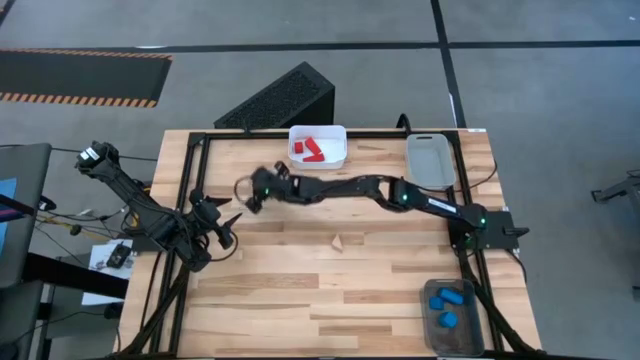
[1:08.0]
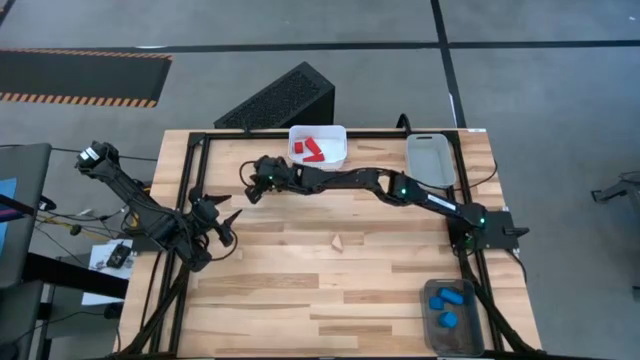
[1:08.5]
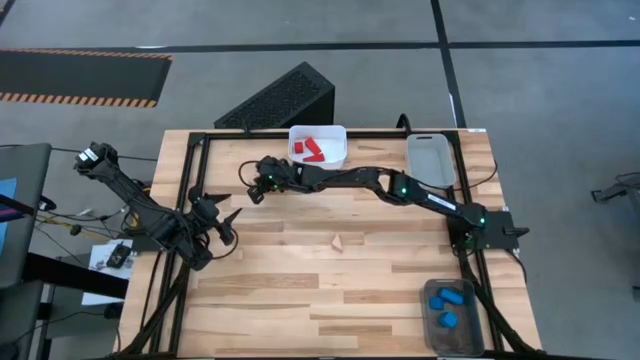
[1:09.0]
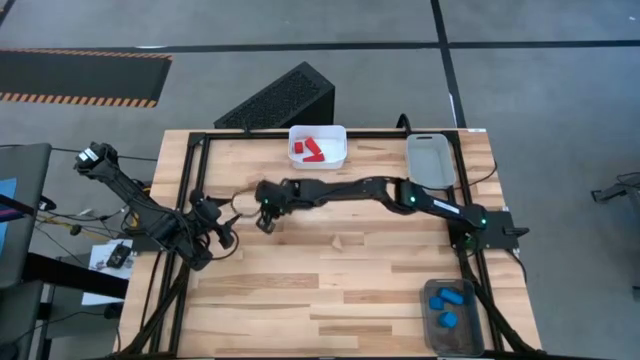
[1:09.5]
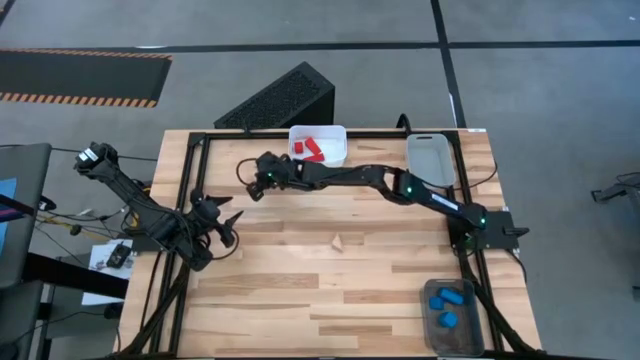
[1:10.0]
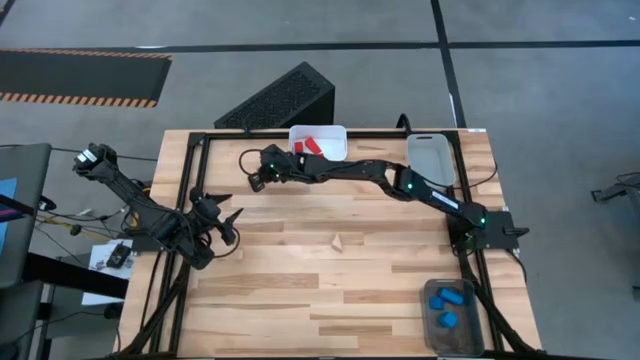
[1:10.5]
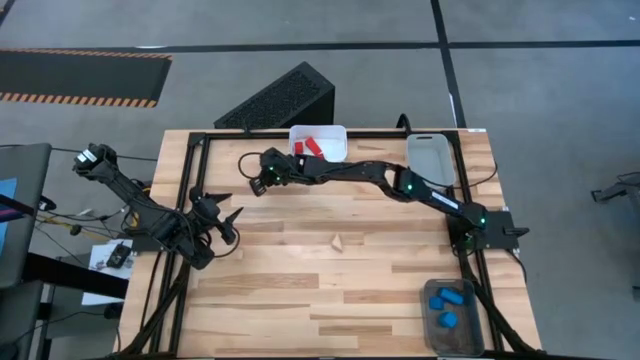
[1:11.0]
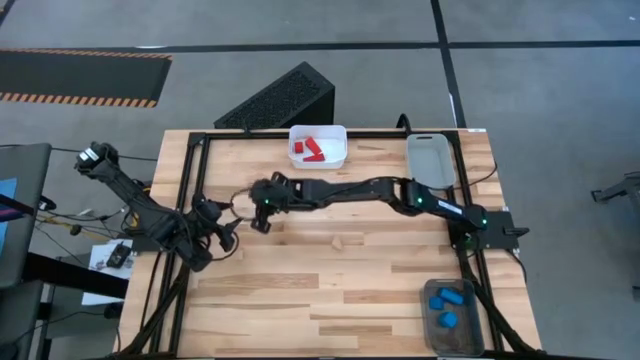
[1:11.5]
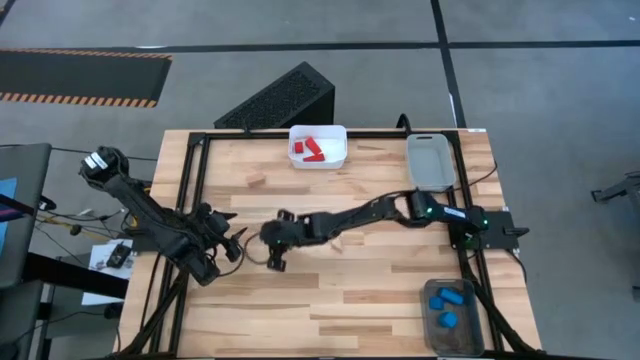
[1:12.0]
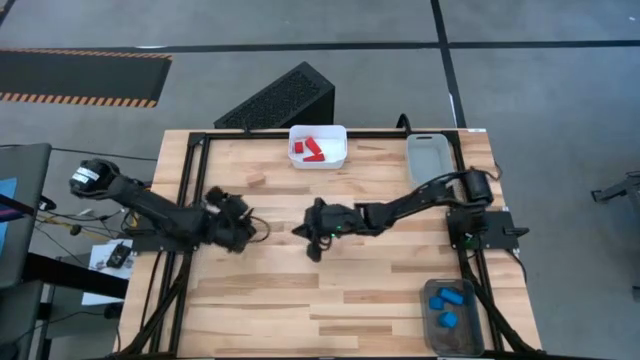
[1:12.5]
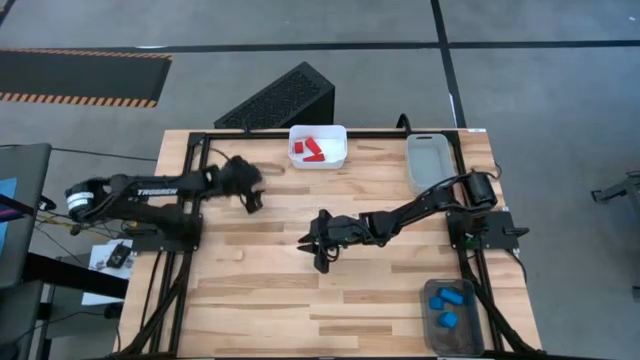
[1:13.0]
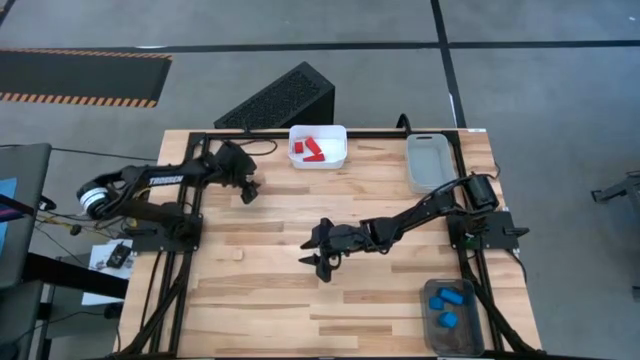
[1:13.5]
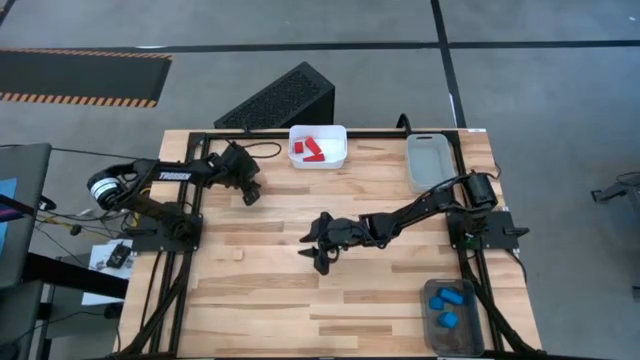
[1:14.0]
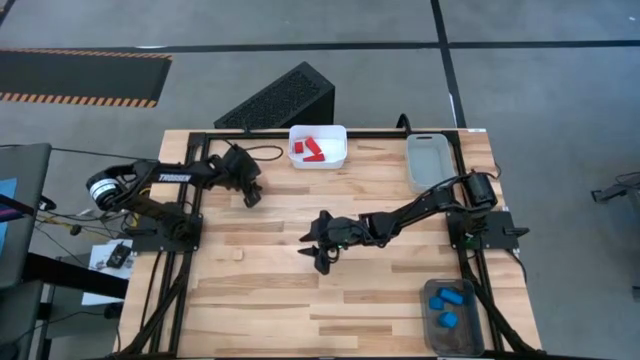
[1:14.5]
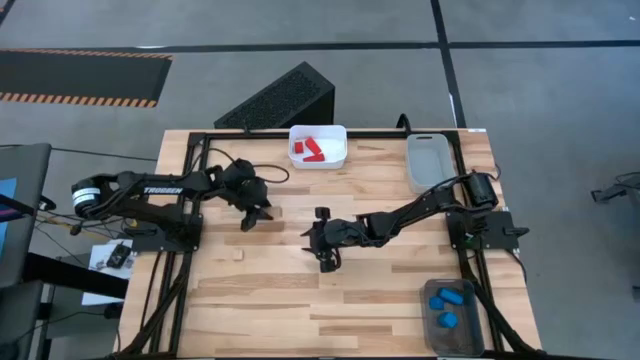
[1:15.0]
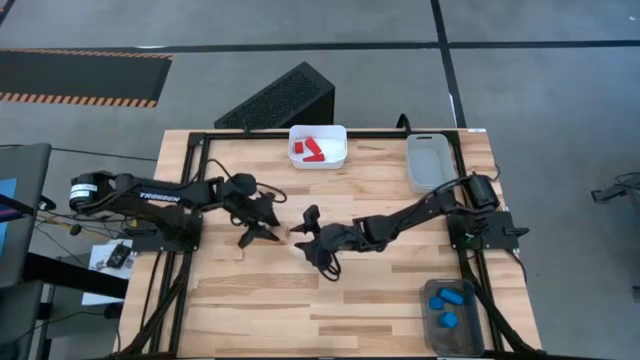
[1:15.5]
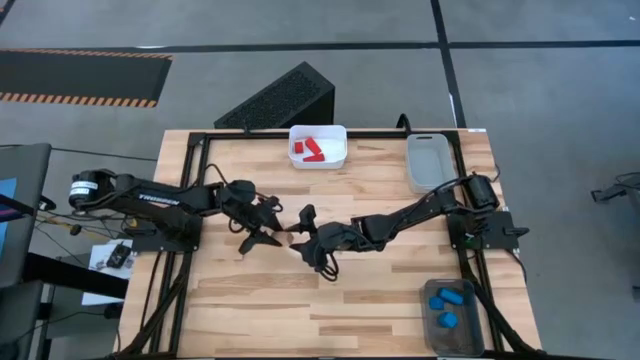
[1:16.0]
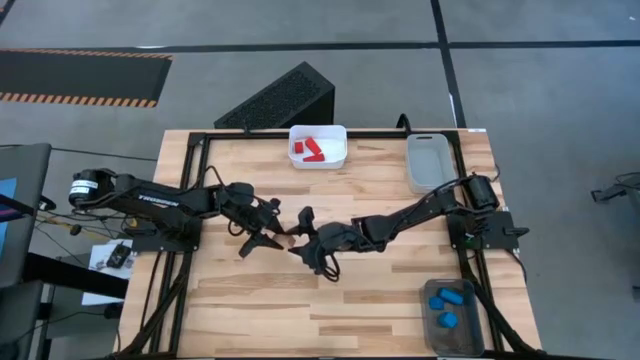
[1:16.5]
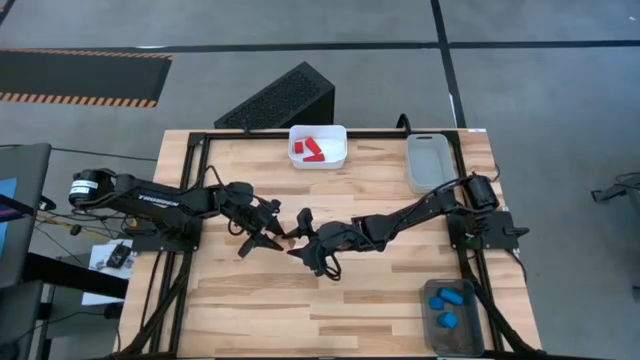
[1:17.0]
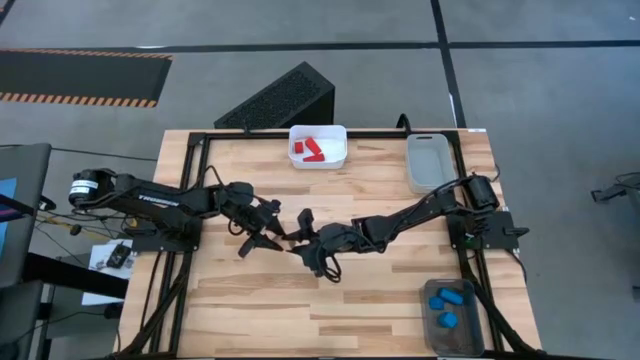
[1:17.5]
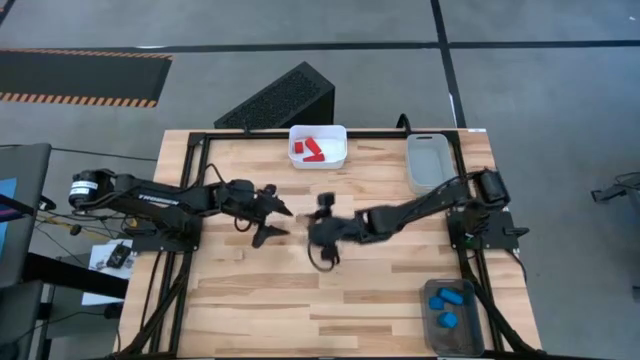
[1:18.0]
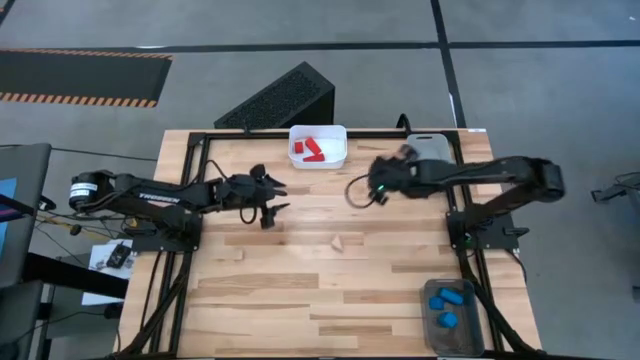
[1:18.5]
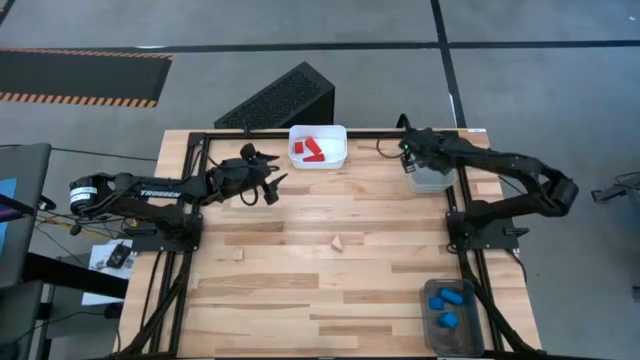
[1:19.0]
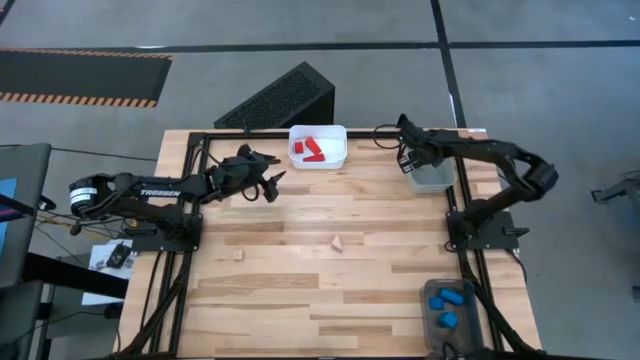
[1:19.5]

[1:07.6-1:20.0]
Task: Sort & place blocks by color
Put the top left brown block into the gray bin

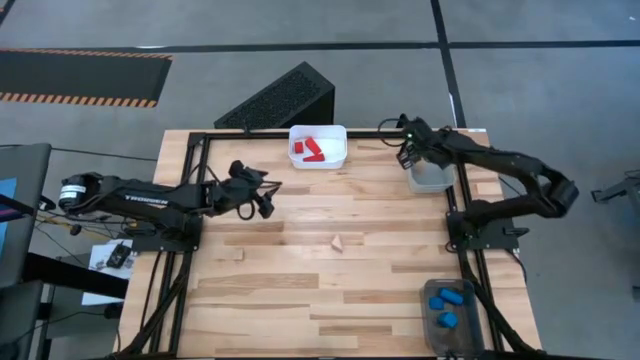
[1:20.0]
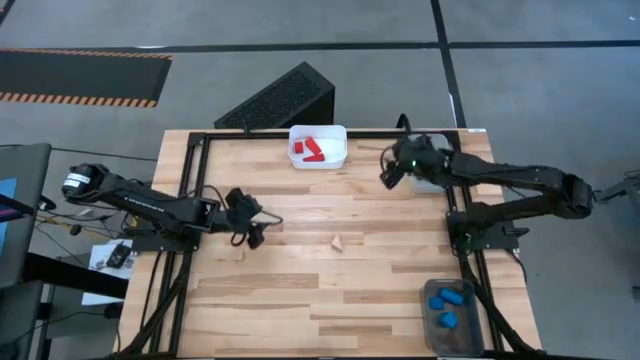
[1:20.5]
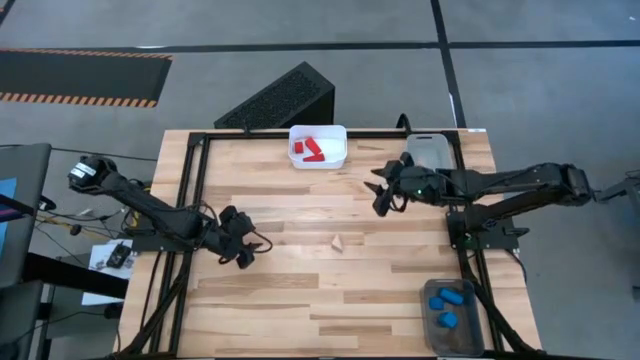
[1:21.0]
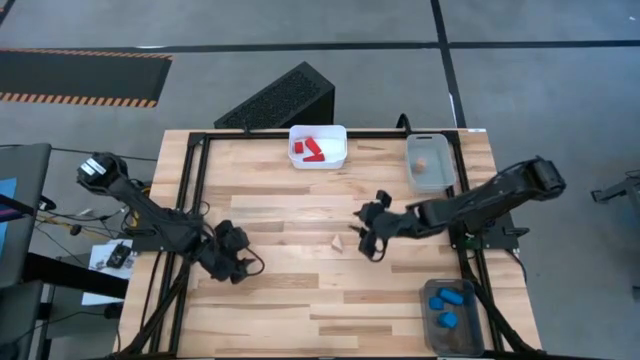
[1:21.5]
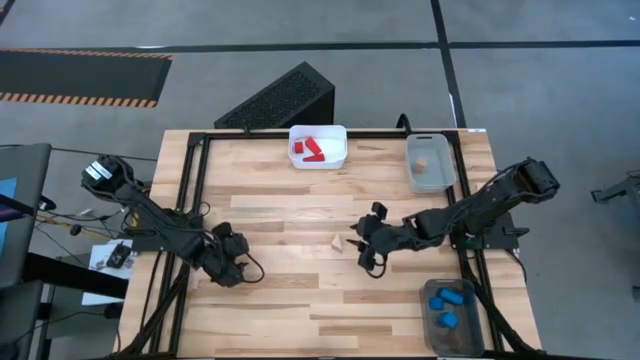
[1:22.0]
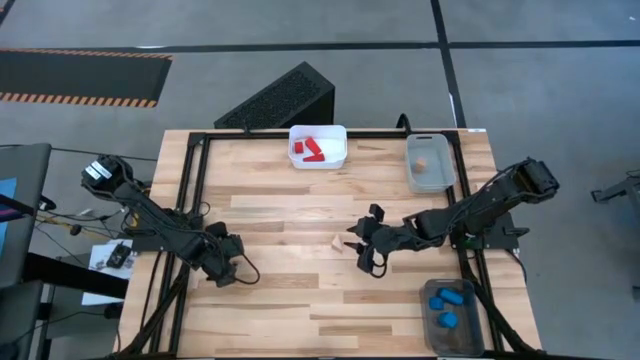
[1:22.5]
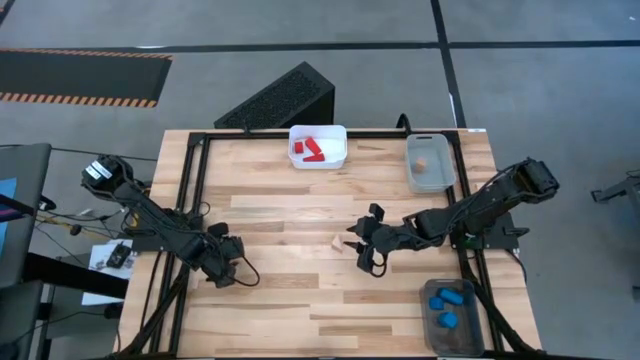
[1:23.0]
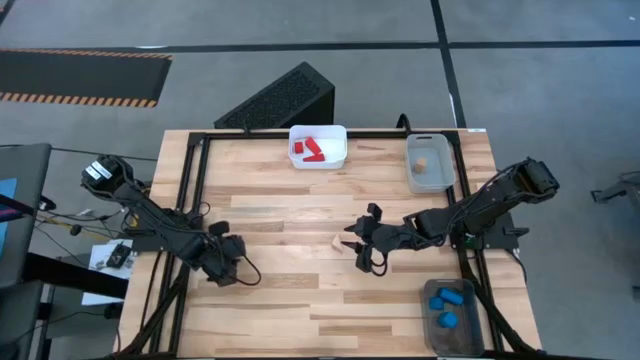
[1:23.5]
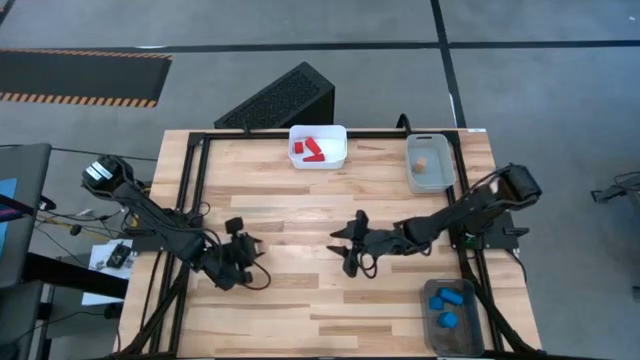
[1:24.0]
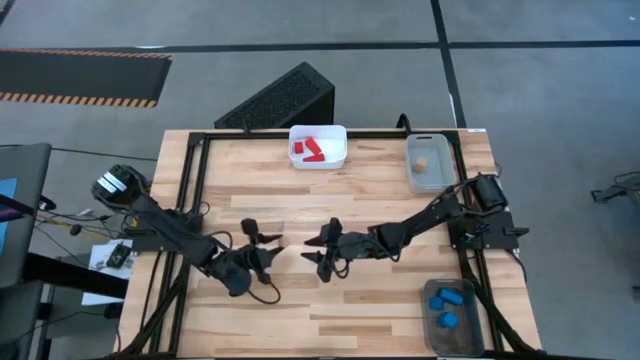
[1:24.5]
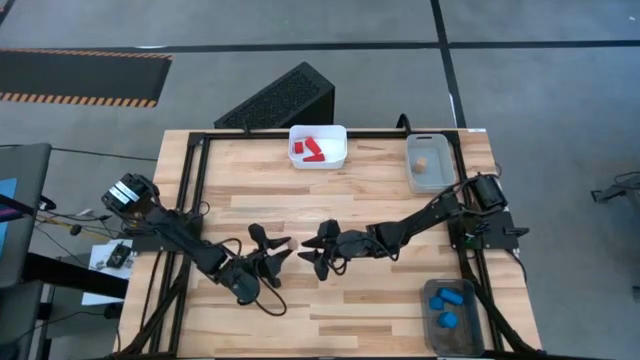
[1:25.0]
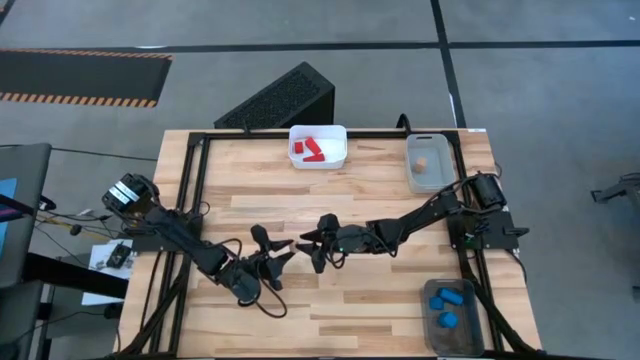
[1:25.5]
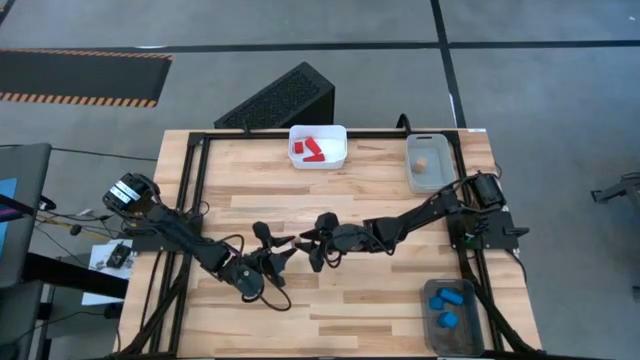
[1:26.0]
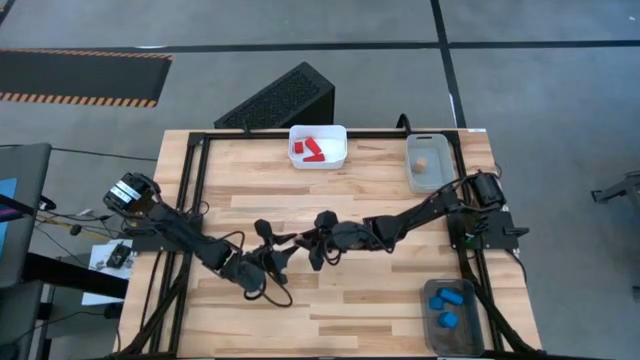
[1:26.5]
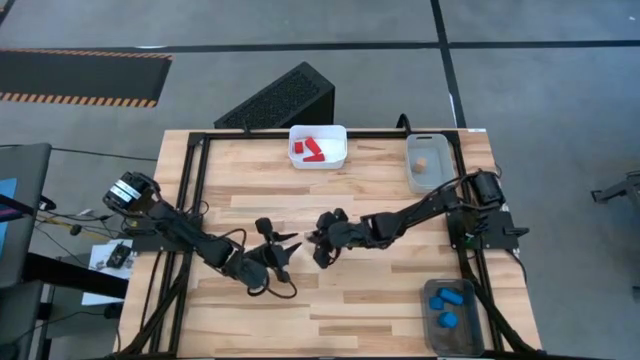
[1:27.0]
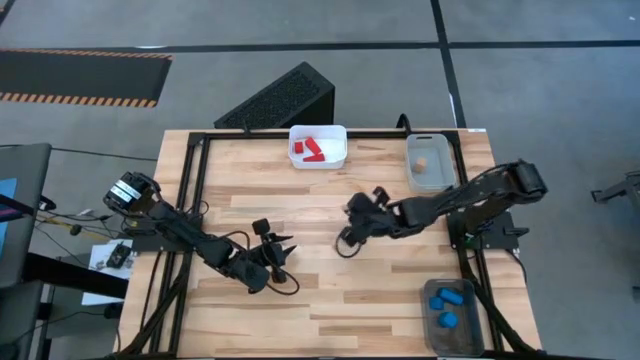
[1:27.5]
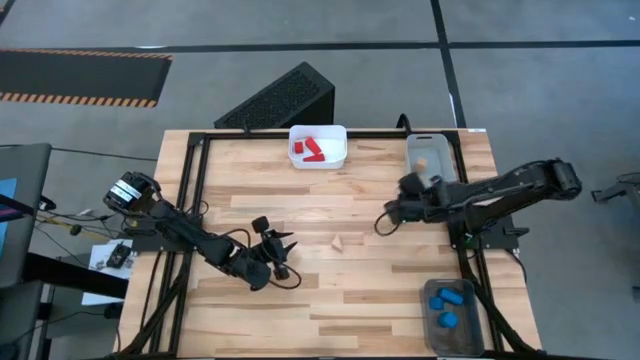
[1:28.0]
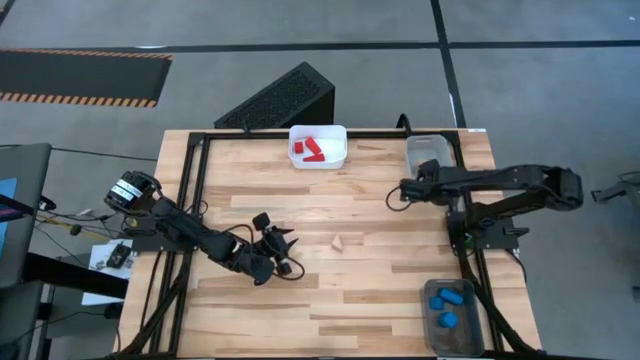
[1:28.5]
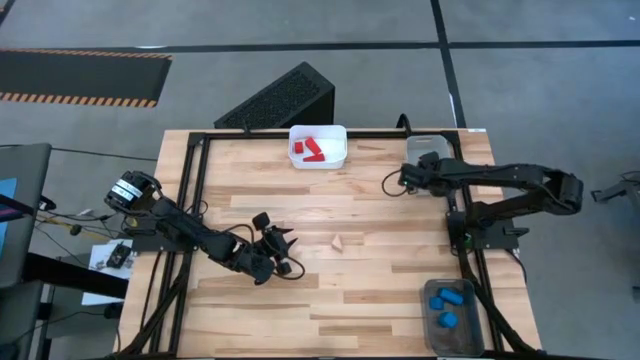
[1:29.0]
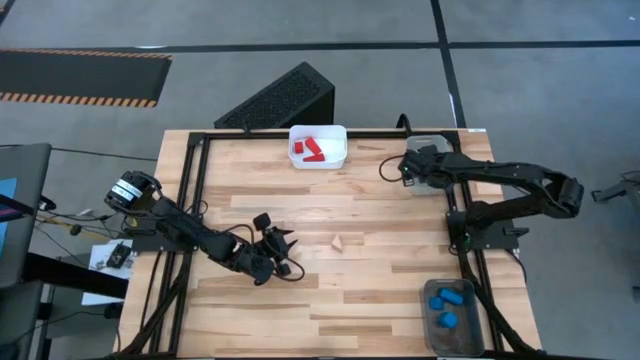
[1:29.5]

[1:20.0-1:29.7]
Put the left brown block into the gray bin
